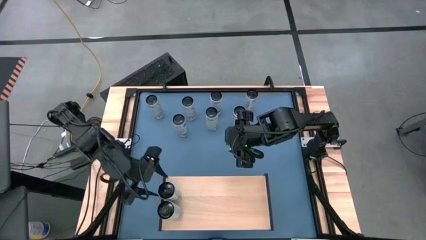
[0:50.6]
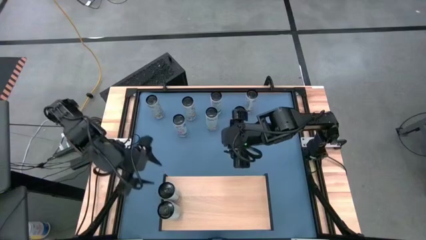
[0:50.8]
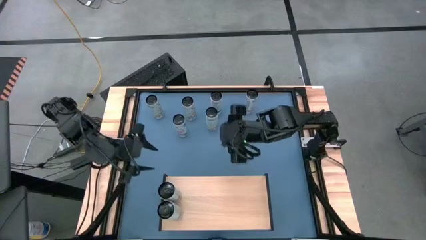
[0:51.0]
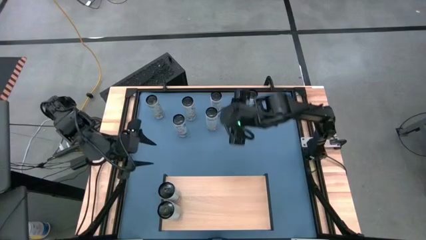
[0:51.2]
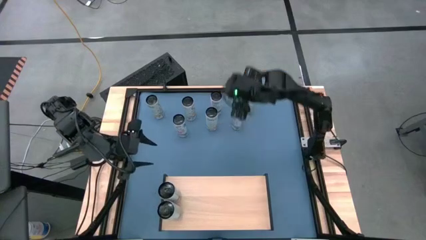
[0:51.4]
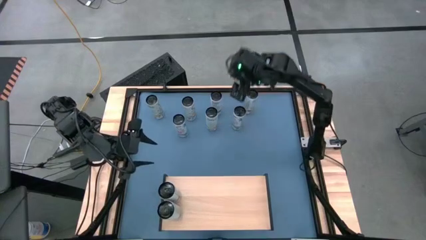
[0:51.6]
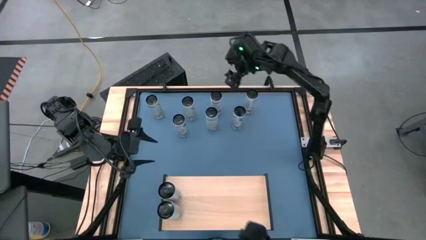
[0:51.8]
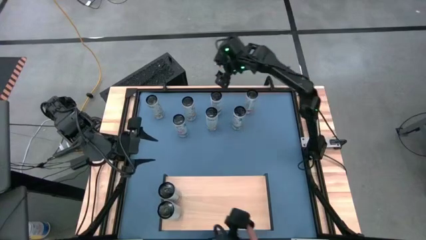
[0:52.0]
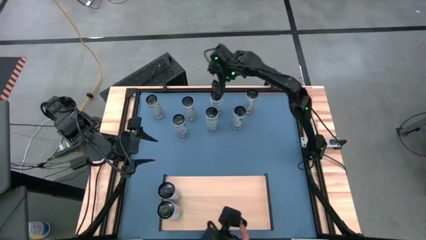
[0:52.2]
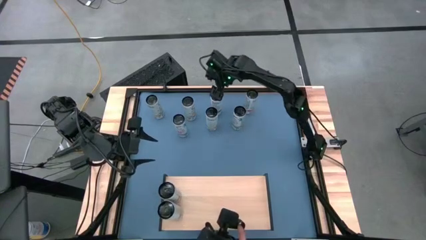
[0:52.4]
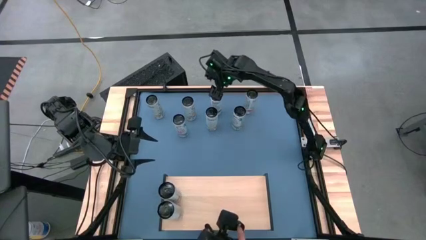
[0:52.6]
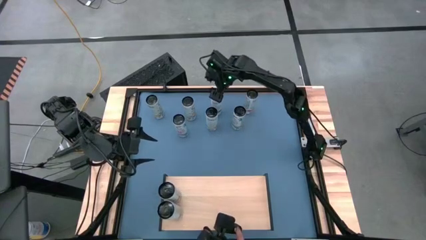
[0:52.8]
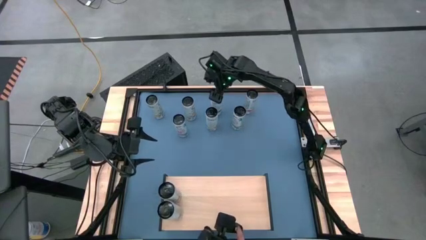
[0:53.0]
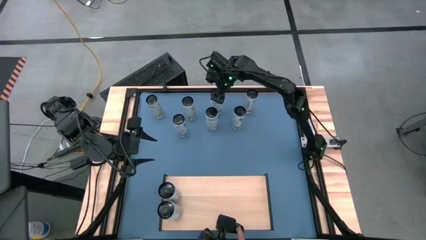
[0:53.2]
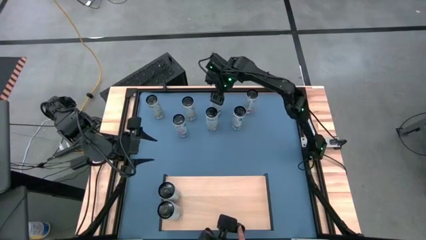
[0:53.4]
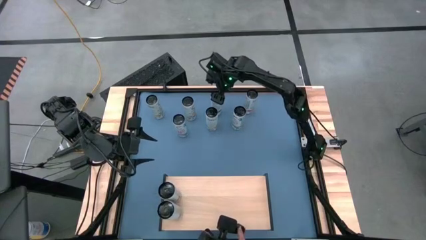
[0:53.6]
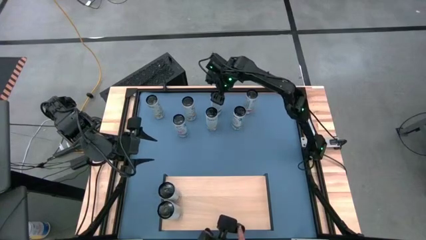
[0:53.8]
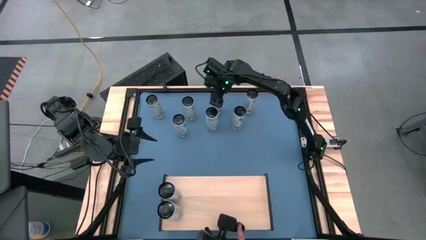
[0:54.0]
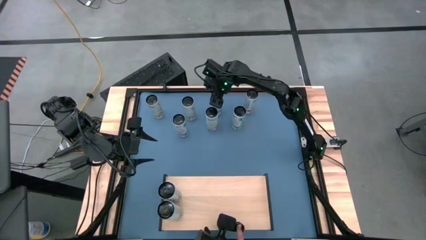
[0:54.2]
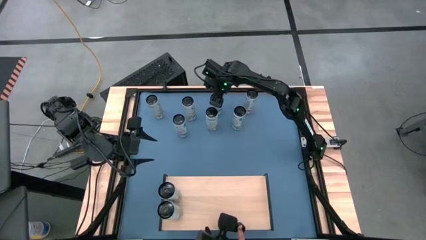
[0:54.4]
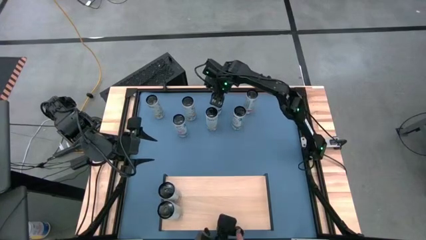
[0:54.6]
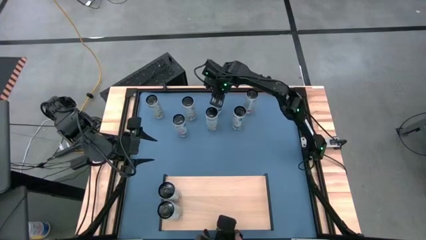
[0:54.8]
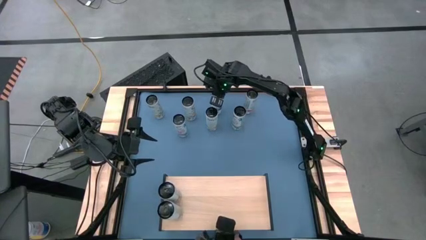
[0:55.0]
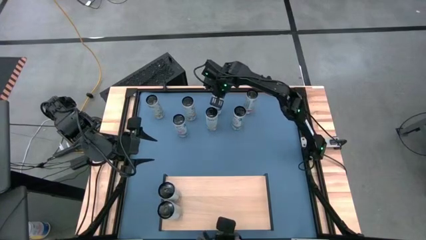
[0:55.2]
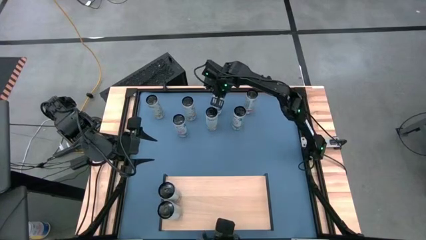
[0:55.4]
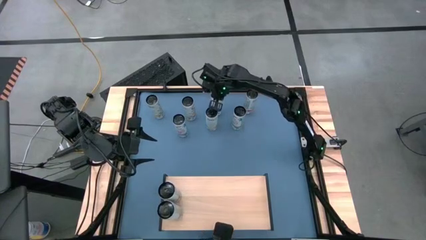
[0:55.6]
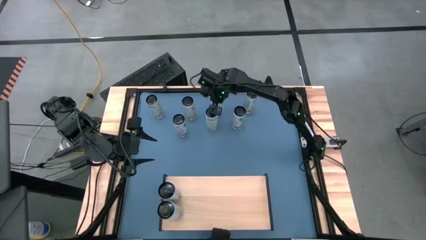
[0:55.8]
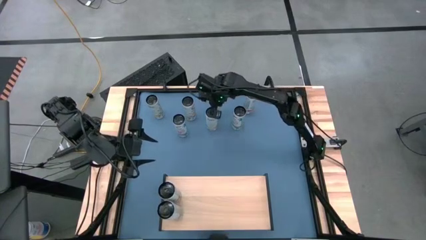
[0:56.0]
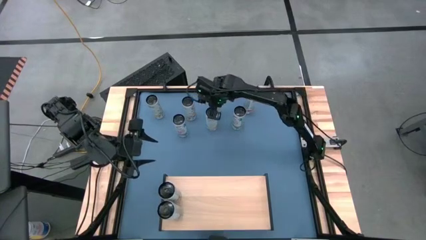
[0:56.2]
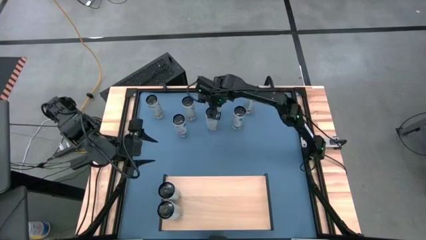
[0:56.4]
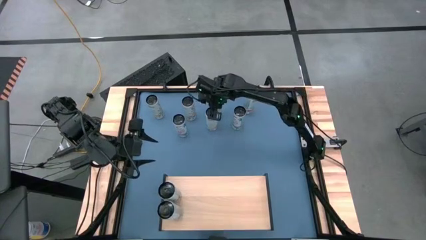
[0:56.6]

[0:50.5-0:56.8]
Task: Place canned beverage on shelf
Put the white blue soda can on the shelf aligned with the other white blue soda cans

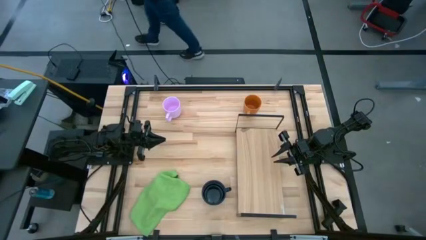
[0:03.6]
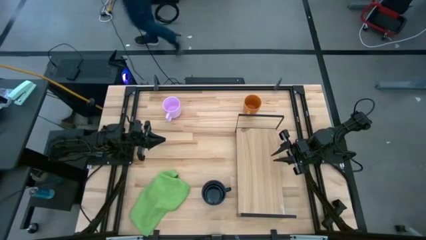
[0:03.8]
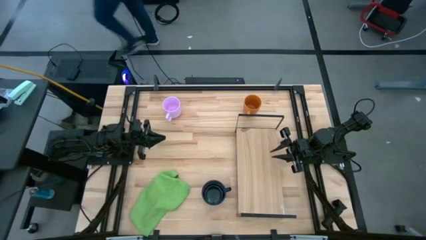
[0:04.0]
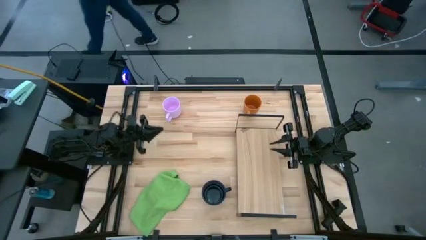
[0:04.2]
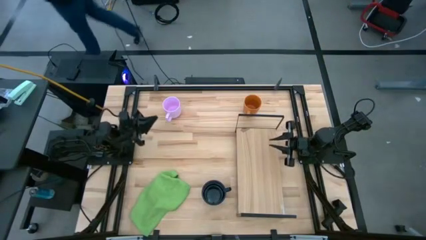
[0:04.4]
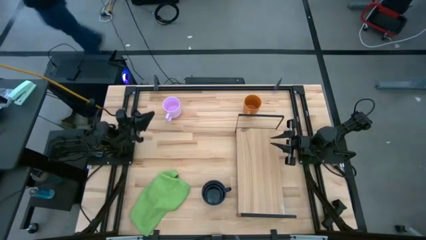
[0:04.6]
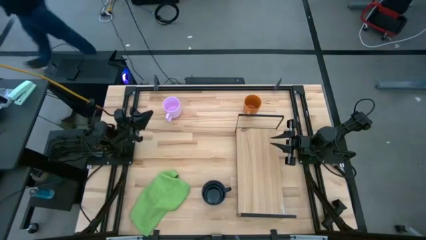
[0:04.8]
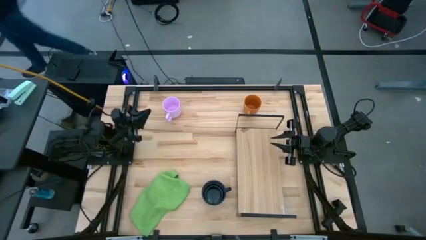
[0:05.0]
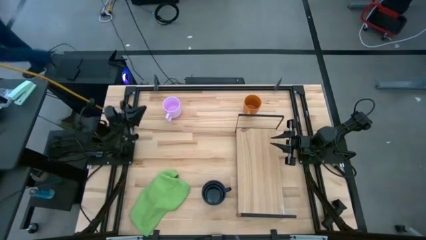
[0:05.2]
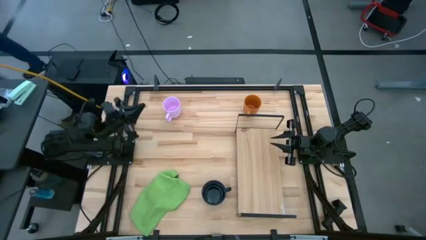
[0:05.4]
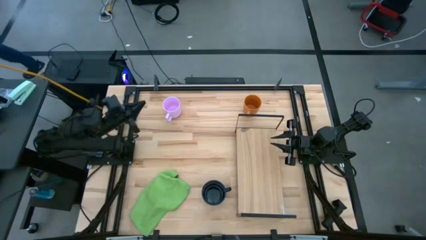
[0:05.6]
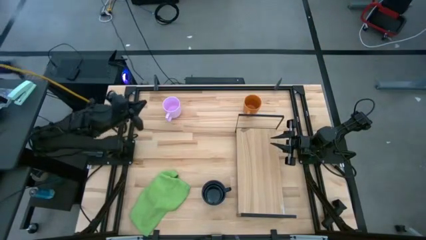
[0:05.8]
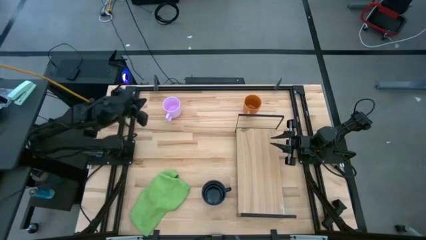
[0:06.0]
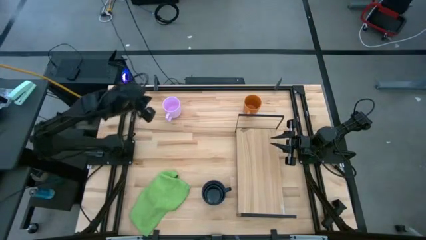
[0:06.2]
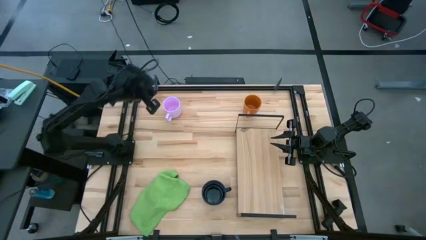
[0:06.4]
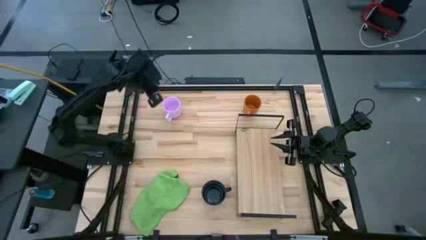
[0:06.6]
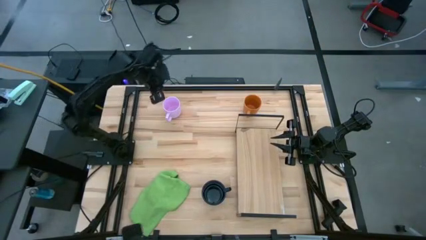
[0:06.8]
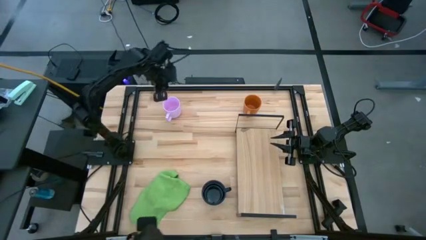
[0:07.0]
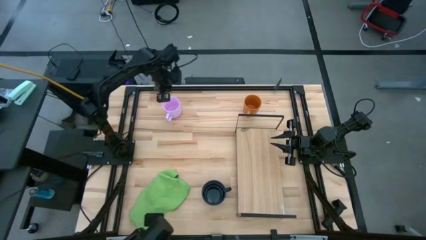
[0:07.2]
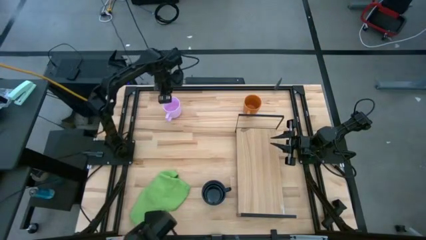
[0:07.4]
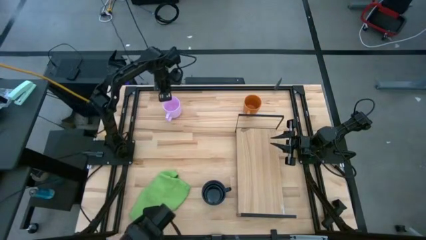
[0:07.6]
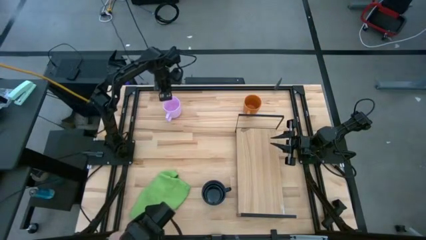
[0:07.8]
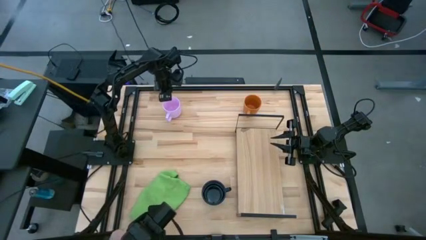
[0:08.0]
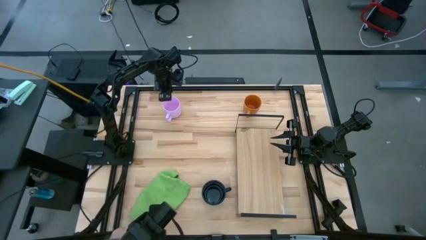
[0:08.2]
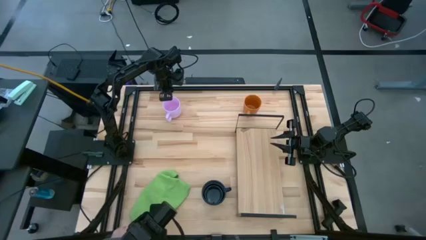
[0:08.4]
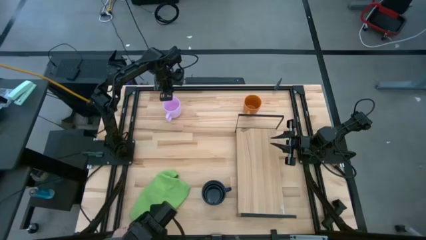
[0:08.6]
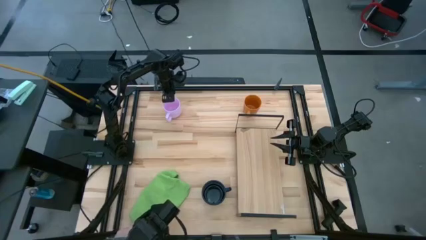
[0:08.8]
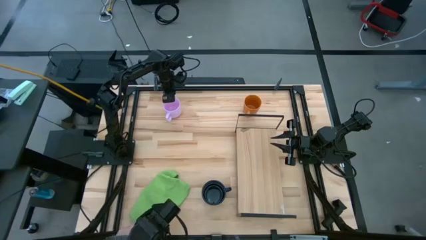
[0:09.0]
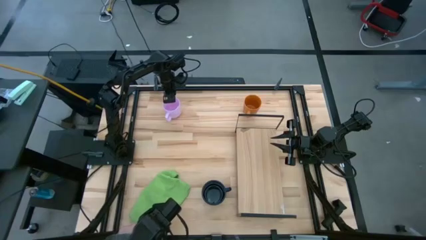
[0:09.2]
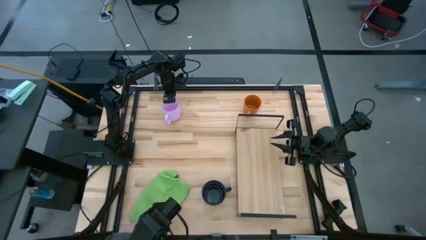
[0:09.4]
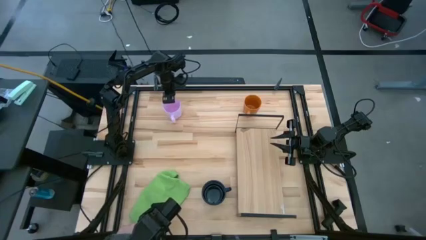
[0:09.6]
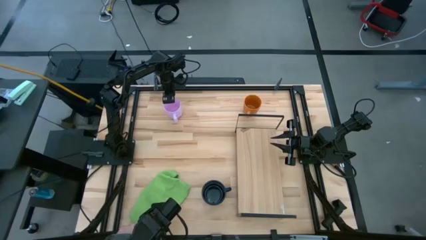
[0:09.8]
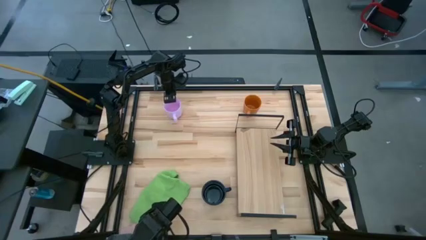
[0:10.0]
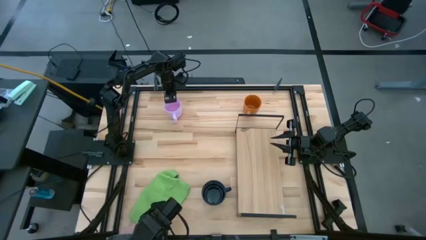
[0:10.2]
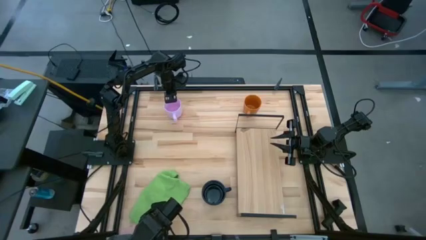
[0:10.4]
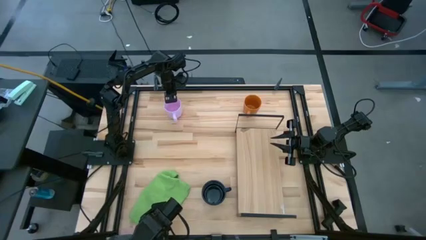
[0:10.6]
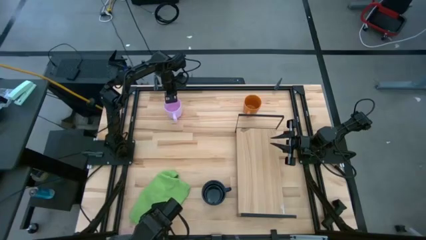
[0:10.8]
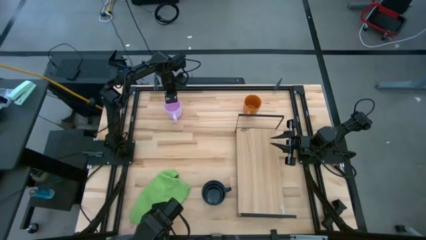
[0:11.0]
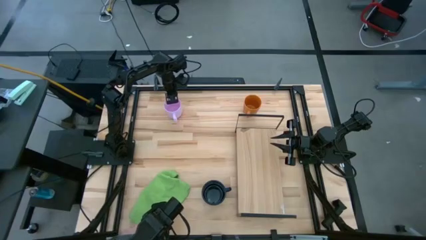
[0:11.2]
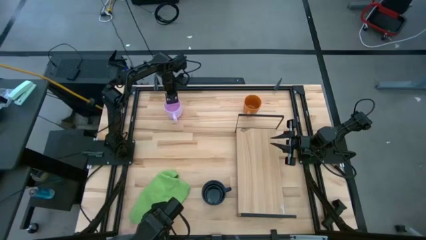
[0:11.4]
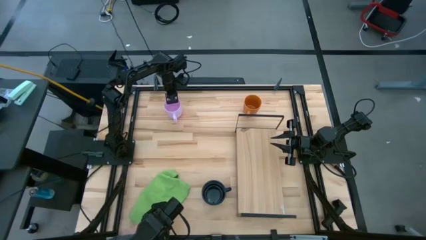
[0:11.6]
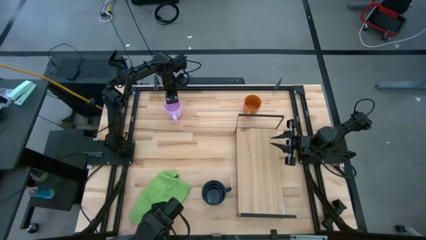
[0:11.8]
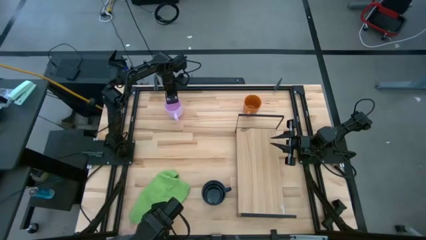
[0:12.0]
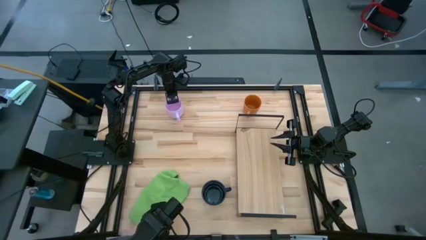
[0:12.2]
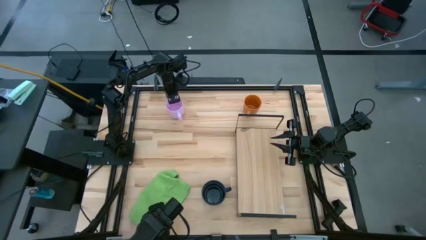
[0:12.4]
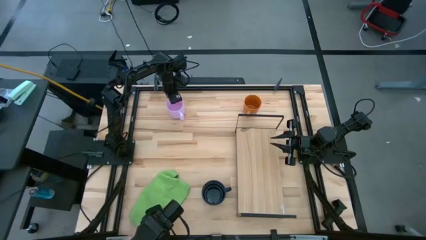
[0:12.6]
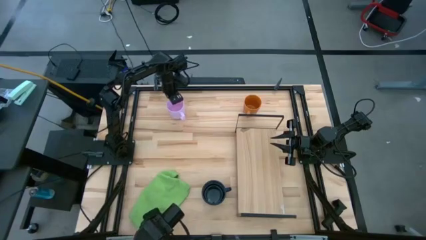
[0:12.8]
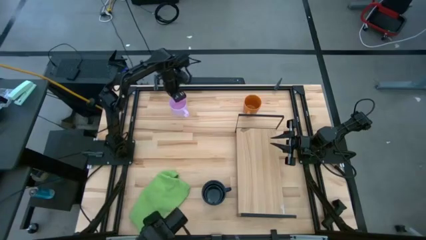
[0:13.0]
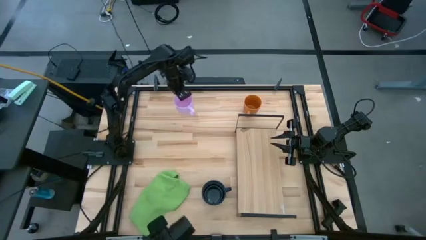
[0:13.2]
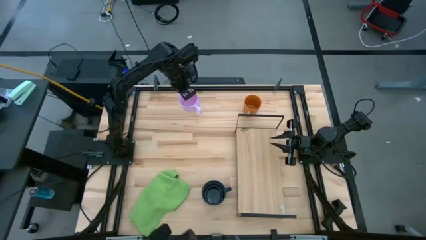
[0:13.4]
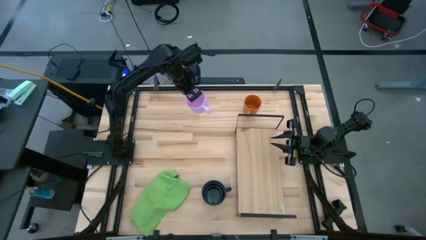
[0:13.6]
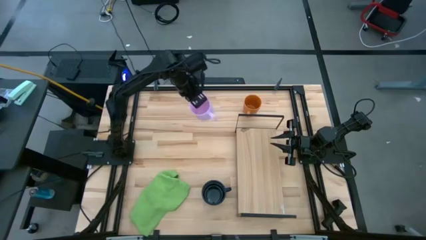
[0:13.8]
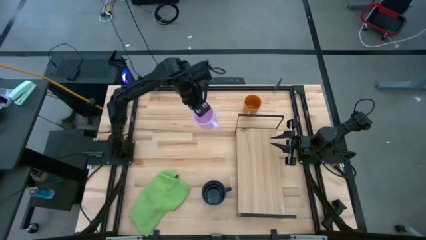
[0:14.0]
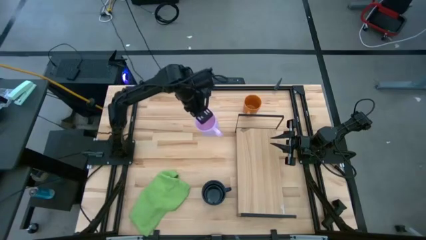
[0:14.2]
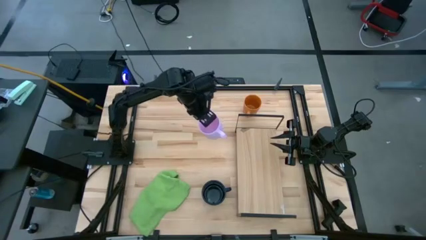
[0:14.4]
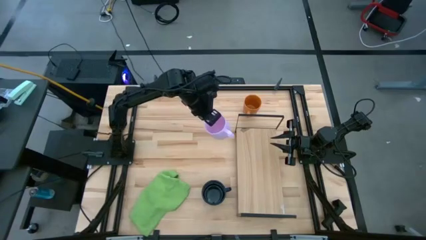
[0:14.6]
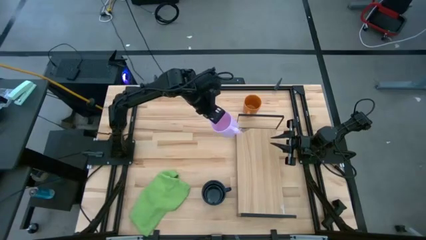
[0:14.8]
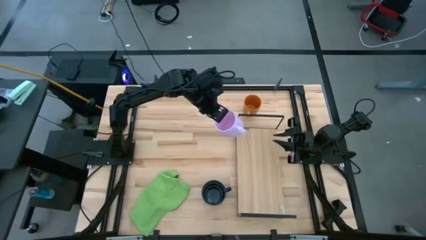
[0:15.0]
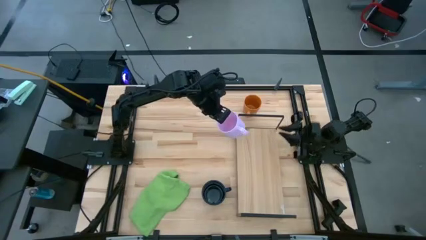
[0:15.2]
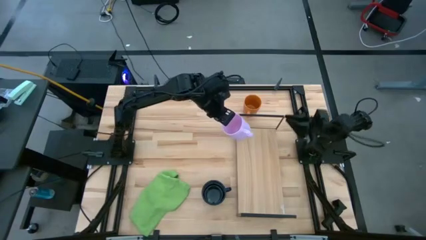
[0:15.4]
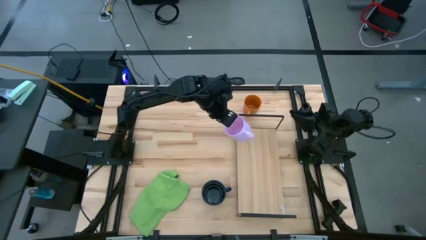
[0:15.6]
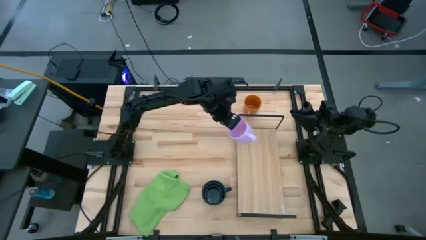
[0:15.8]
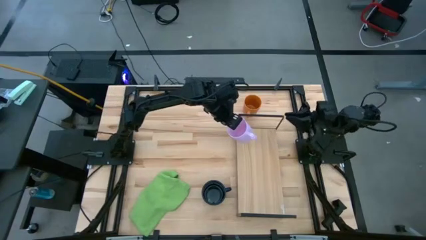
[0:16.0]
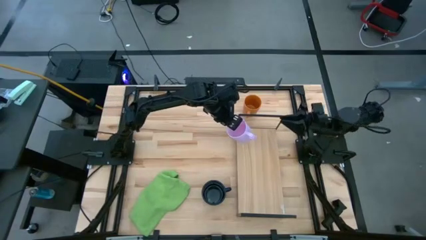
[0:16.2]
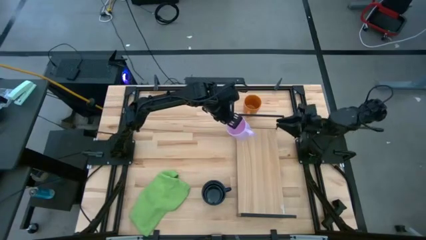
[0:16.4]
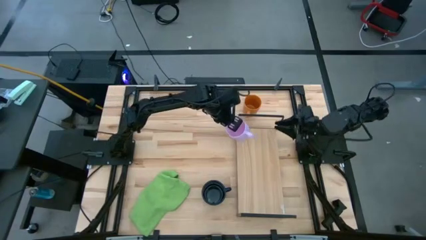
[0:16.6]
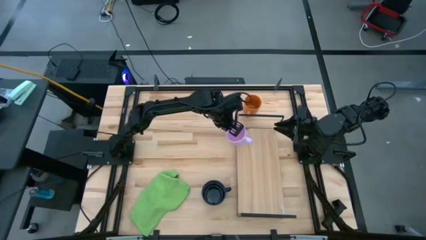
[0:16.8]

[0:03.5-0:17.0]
Task: Stack small to large cups/mugs on shelf
Put the light violet mug on the shelf
